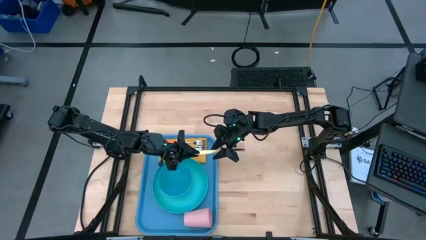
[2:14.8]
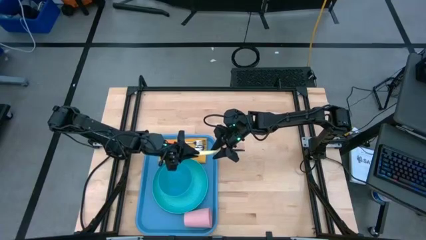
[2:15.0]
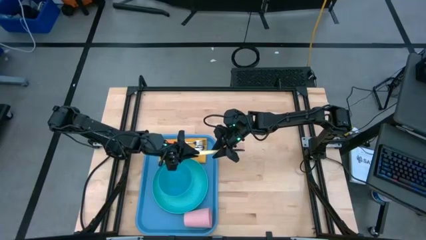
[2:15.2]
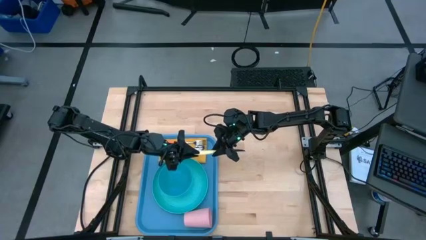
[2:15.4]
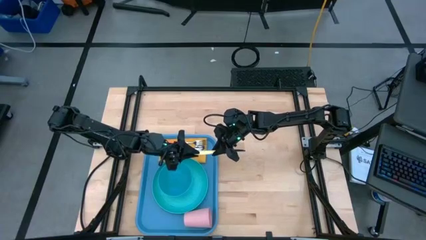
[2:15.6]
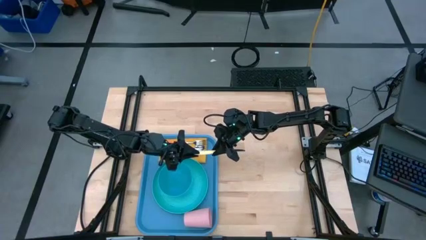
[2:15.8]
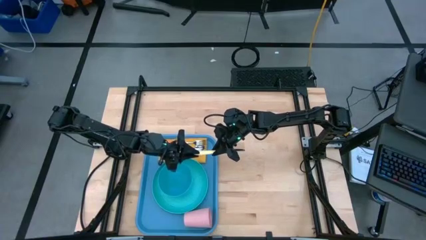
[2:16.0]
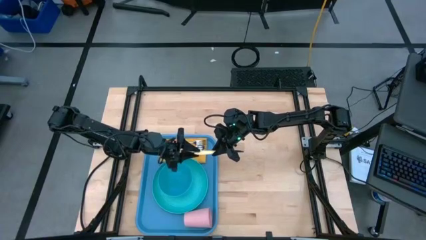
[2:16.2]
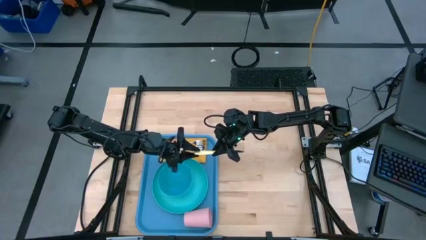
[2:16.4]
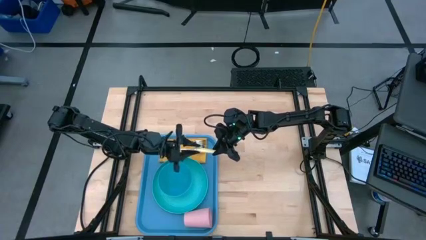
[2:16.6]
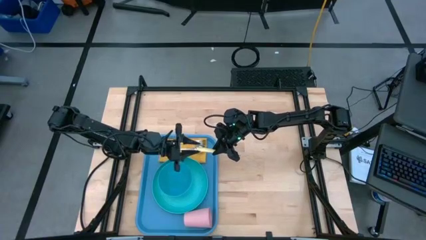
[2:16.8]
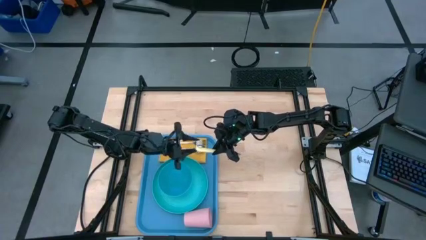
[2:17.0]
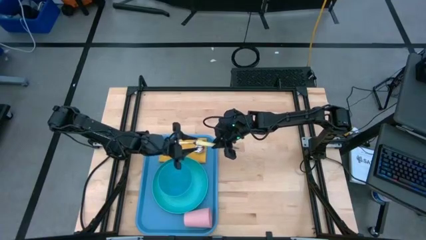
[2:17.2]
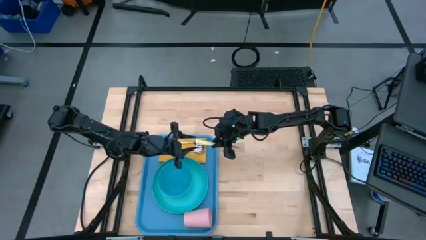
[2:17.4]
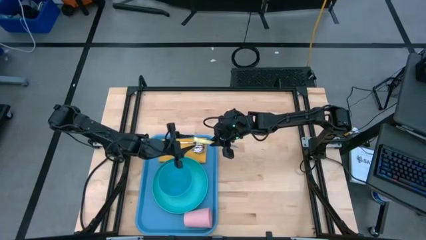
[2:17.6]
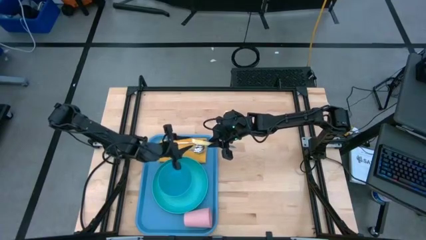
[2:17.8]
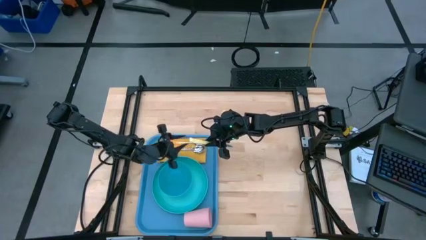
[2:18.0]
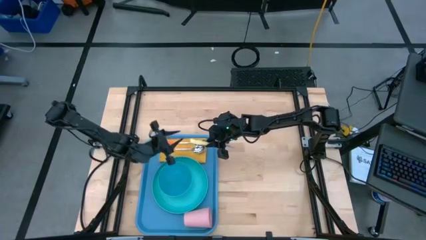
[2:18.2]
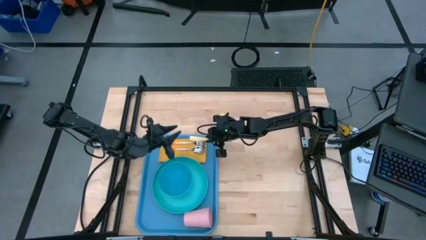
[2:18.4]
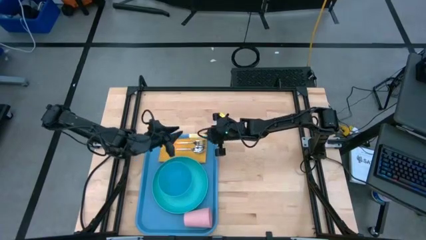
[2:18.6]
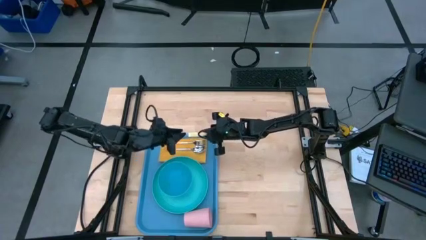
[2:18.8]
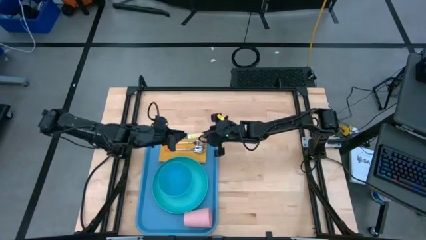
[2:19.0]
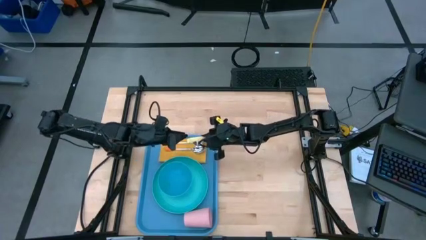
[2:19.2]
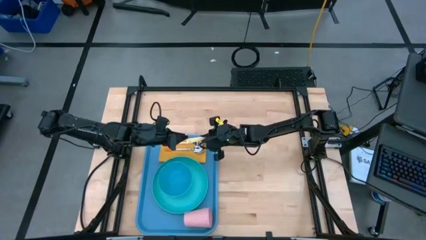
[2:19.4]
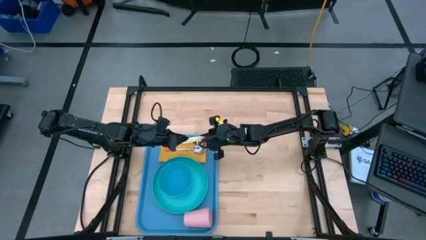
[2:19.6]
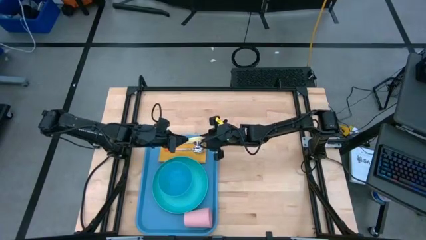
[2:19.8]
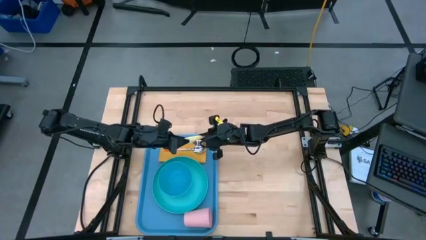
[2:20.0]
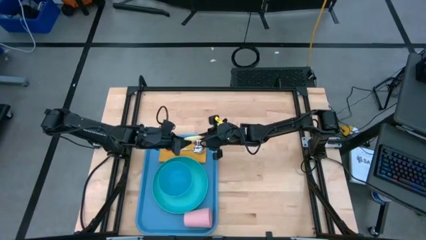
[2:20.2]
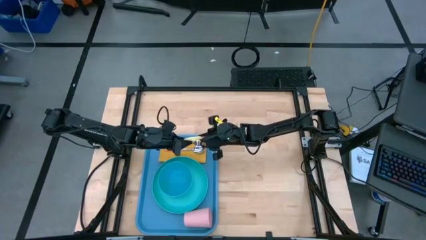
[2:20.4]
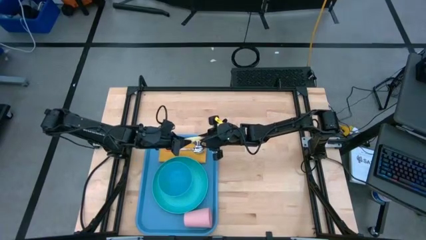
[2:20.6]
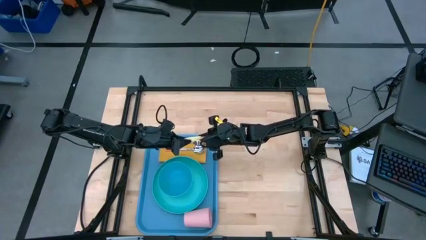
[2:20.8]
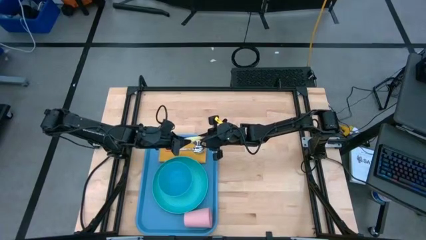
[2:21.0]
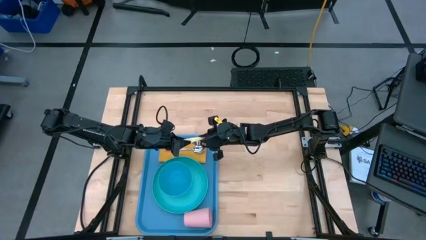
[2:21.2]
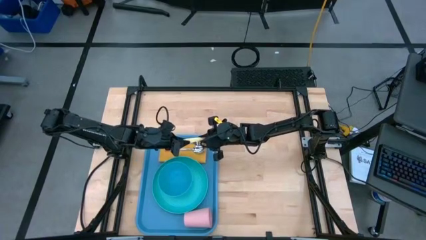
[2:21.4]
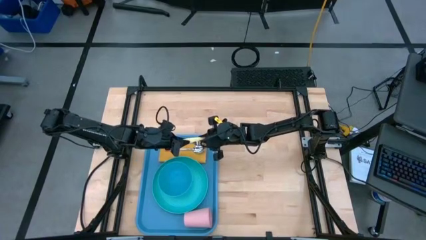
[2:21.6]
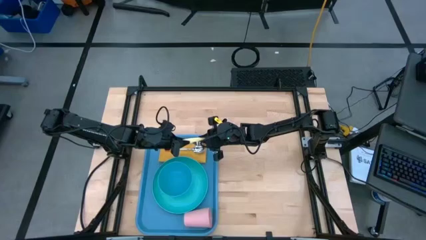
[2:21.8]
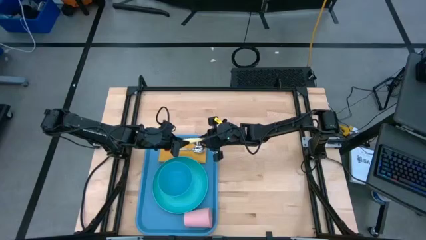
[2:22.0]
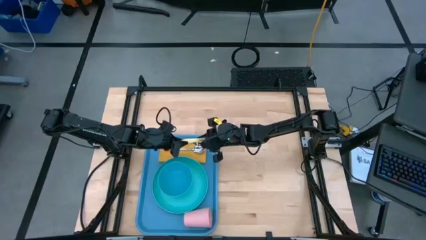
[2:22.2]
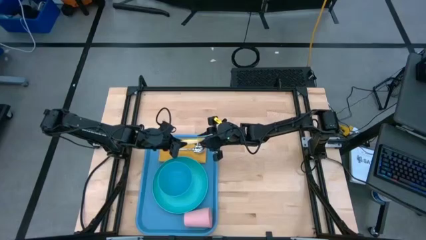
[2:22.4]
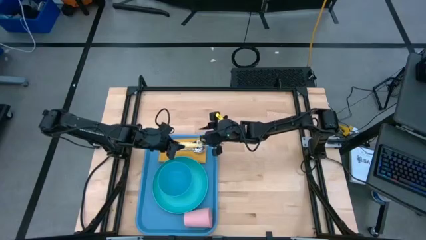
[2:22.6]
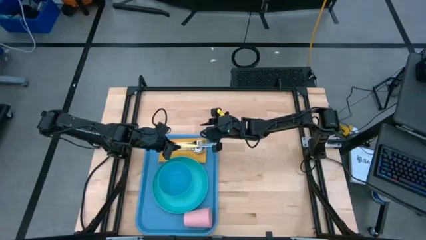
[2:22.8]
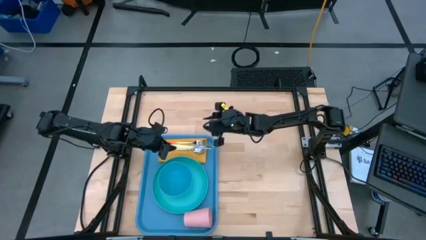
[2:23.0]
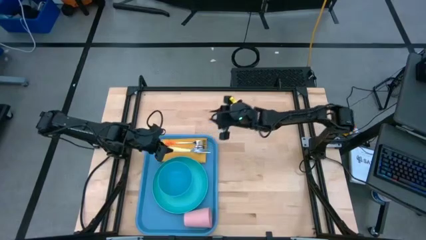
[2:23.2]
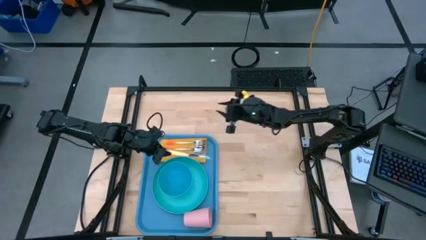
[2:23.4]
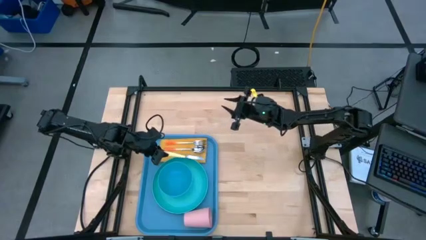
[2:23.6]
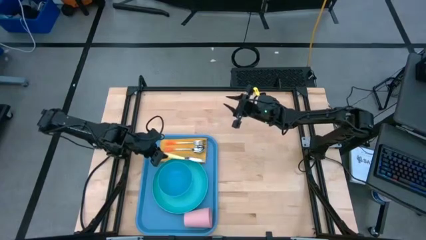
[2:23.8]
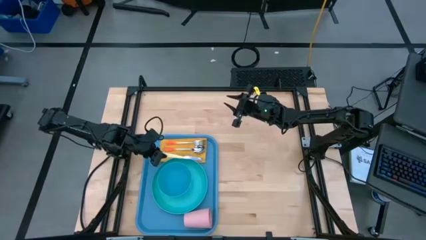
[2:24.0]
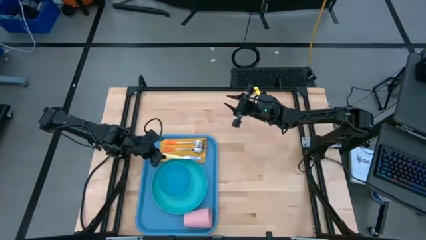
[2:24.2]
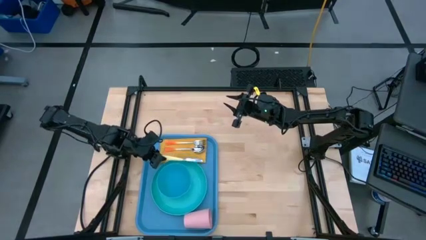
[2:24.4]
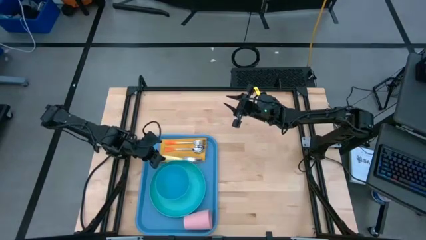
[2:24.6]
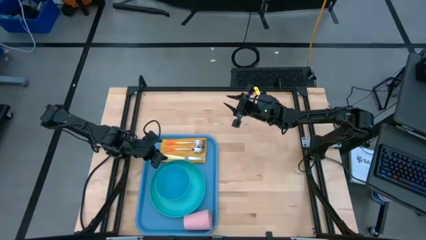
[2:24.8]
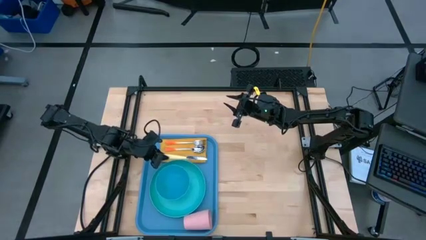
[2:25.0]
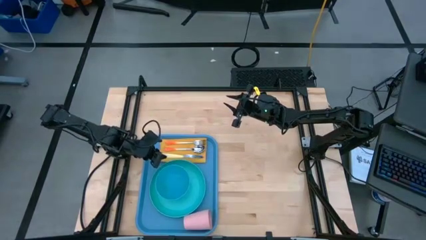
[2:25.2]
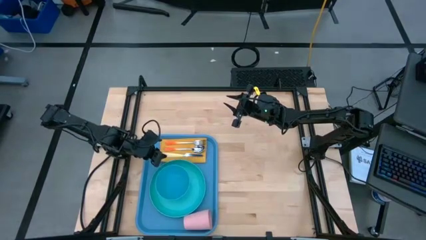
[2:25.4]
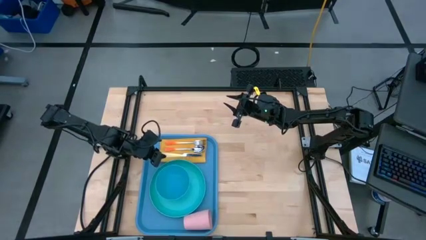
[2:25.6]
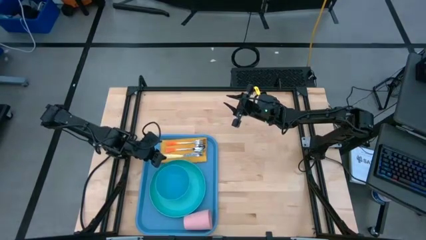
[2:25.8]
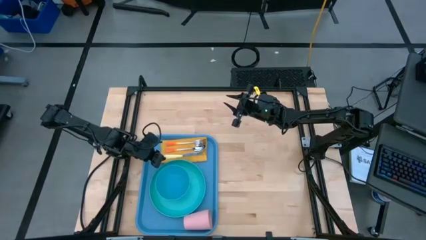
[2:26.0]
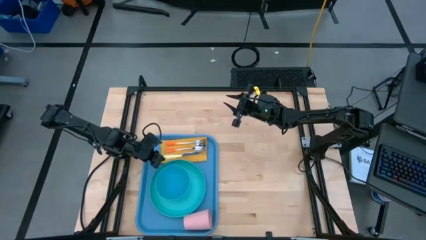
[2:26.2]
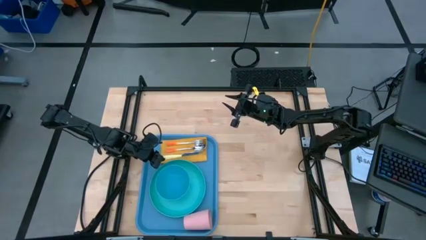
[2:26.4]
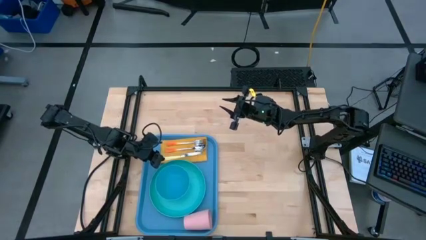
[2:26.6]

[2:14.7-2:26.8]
Task: Set up tray
Put the yellow knife to the bottom of the orange spoon on the yellow napkin on the blue serving tray

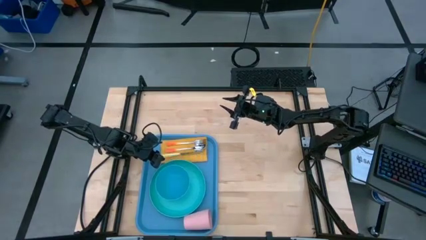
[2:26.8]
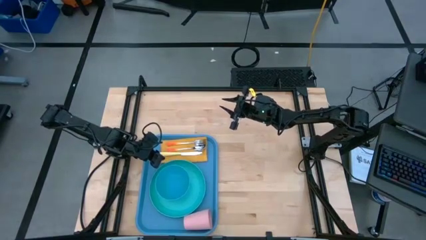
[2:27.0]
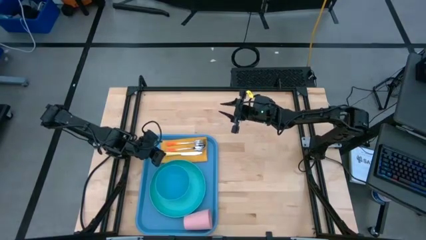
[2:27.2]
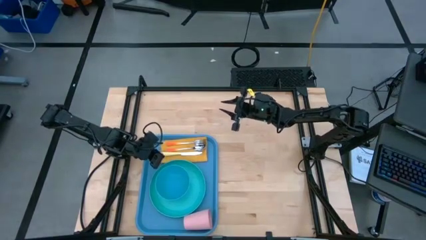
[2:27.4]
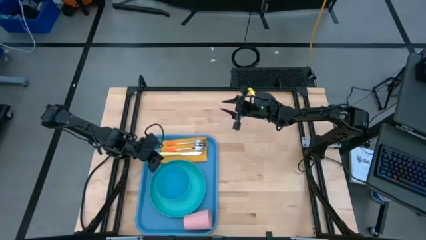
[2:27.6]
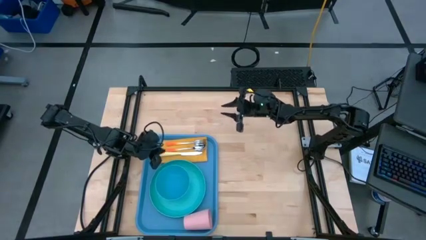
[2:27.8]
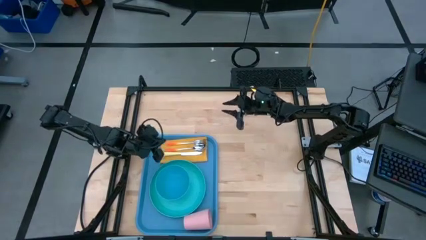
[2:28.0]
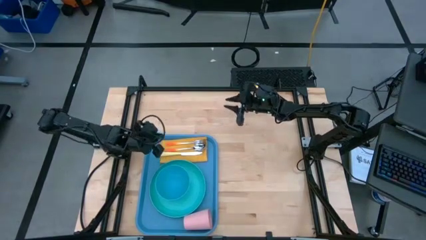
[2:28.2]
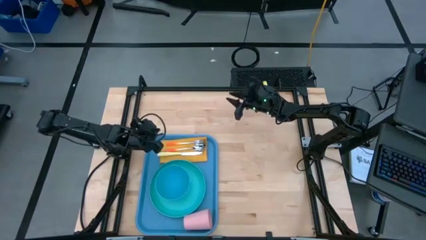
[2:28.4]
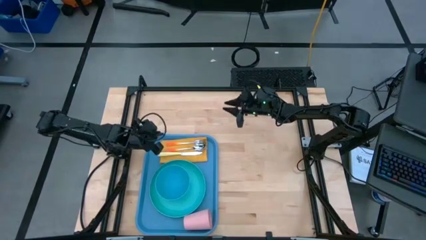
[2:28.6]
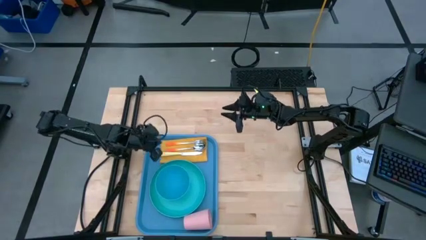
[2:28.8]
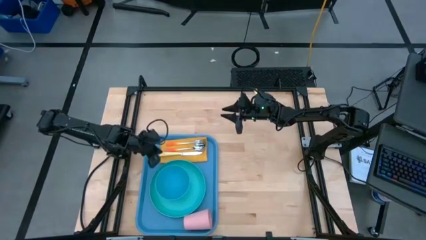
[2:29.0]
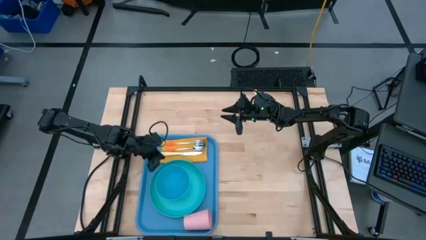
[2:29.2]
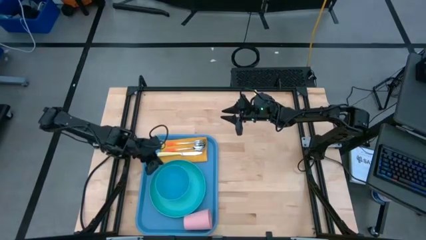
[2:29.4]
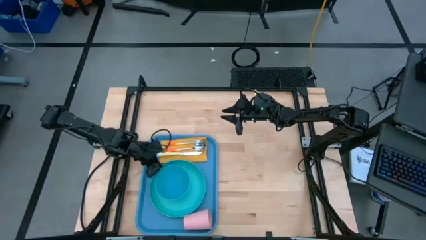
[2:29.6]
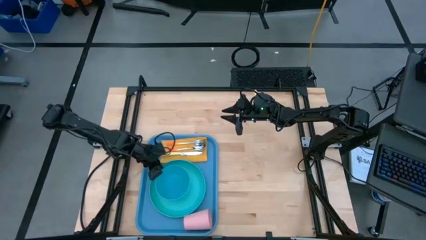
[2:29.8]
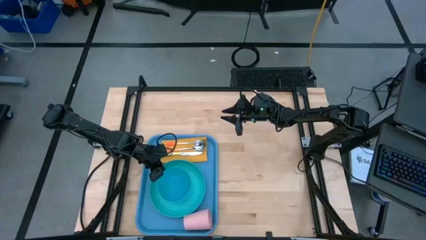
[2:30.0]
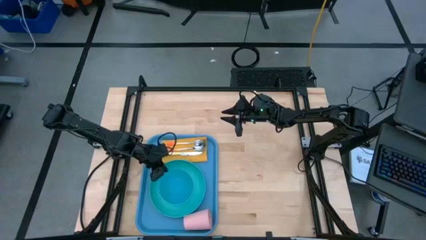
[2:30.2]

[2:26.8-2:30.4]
Adjust the blue bowl on the green plate on the blue serving tray
